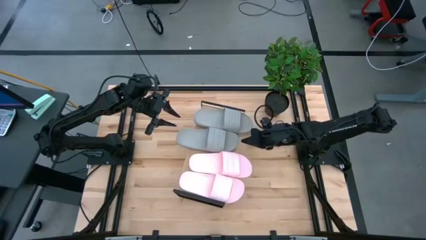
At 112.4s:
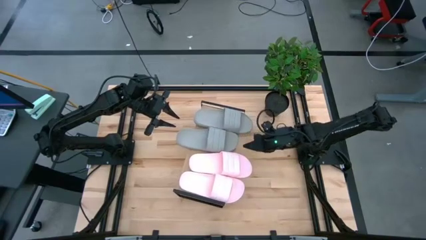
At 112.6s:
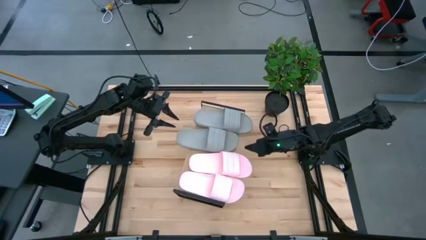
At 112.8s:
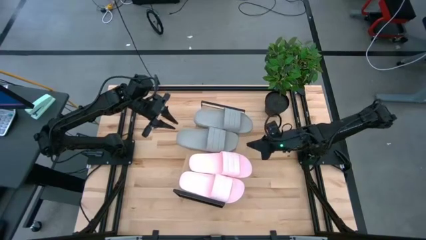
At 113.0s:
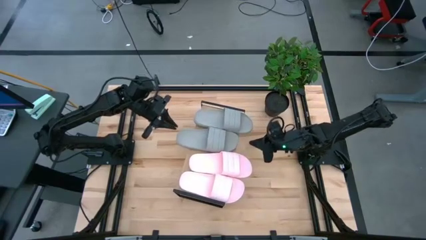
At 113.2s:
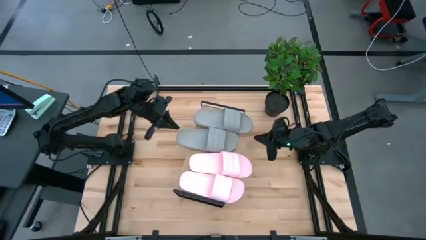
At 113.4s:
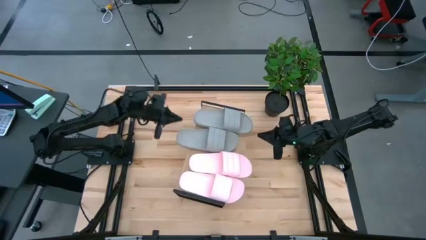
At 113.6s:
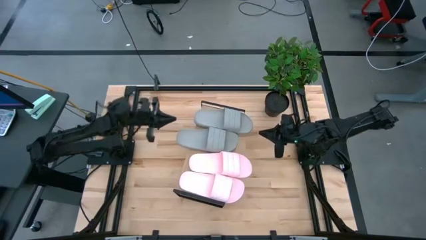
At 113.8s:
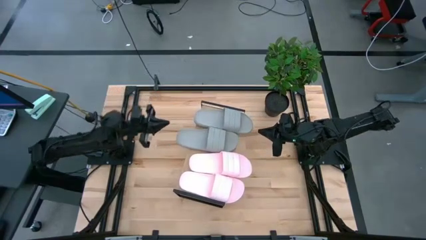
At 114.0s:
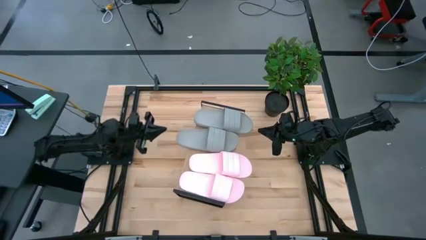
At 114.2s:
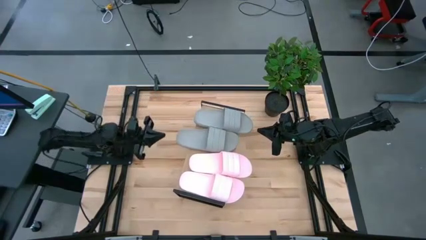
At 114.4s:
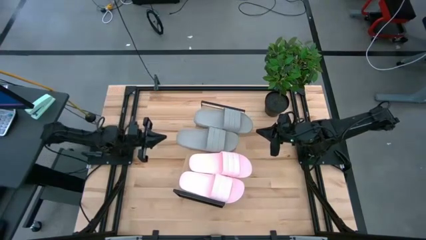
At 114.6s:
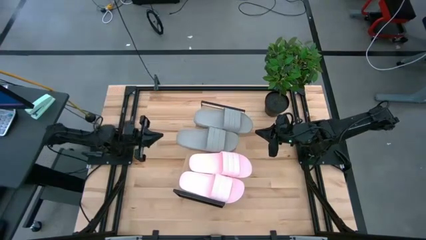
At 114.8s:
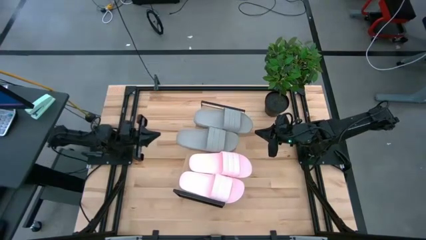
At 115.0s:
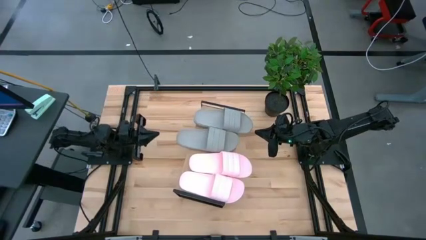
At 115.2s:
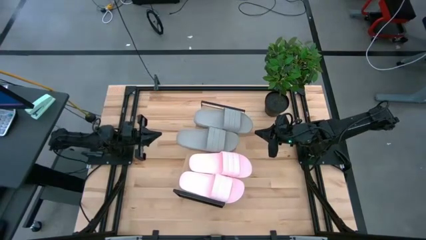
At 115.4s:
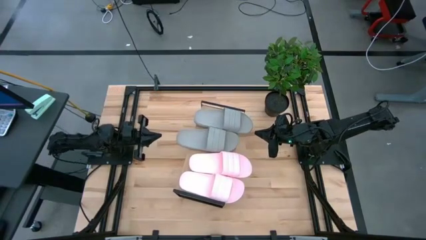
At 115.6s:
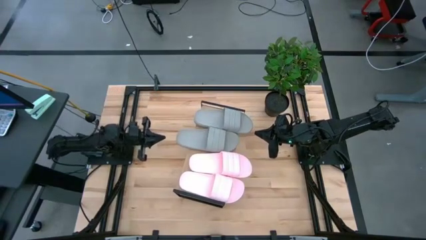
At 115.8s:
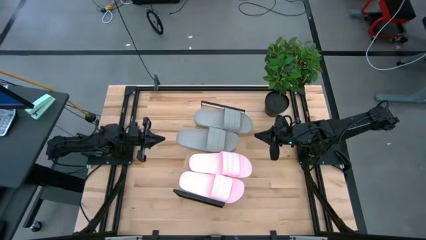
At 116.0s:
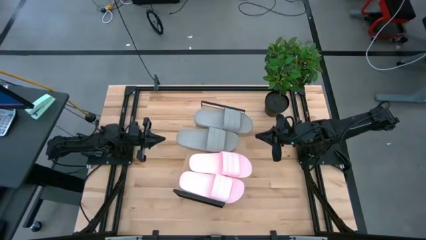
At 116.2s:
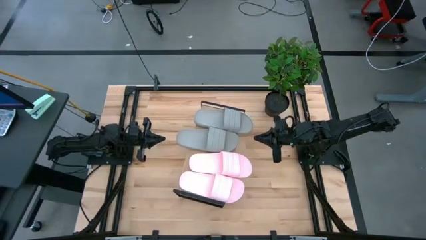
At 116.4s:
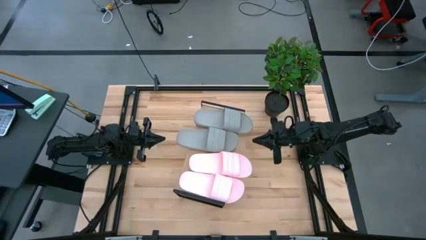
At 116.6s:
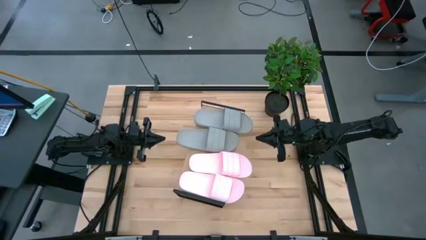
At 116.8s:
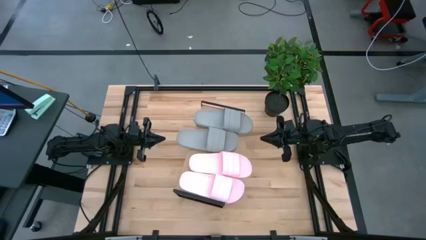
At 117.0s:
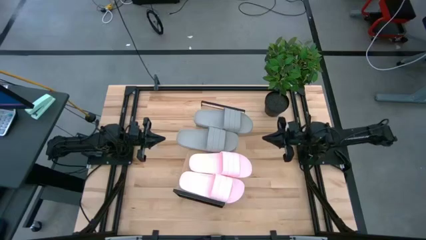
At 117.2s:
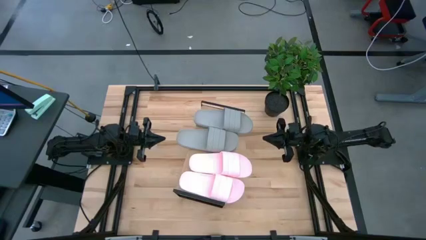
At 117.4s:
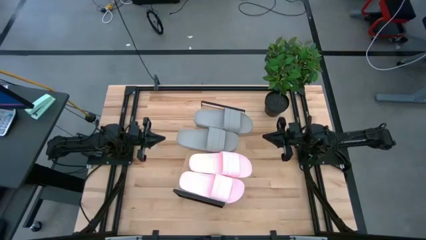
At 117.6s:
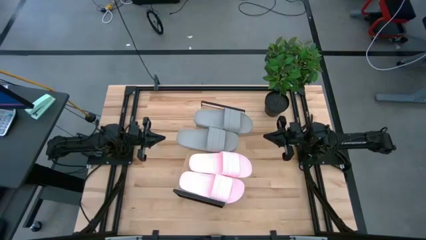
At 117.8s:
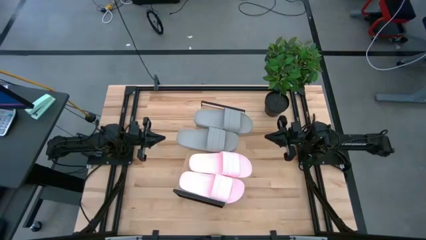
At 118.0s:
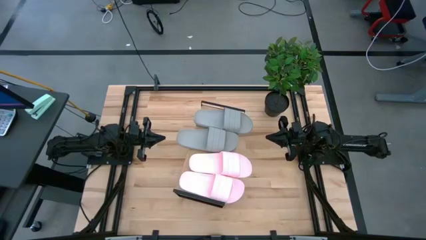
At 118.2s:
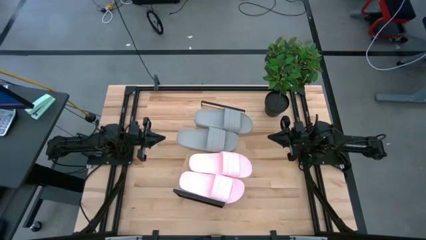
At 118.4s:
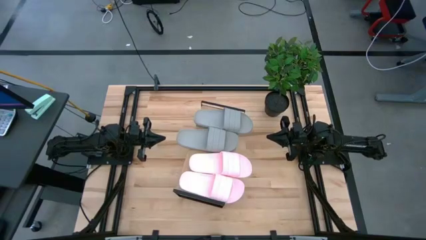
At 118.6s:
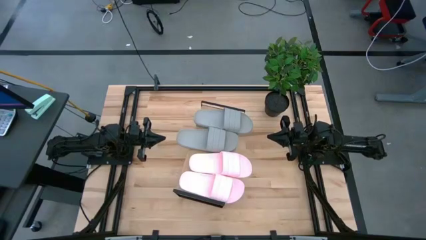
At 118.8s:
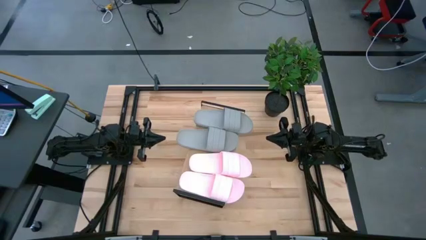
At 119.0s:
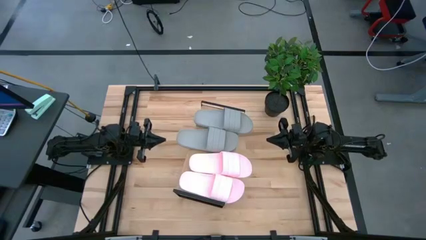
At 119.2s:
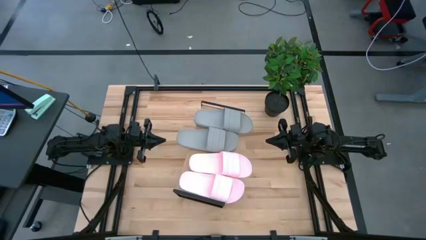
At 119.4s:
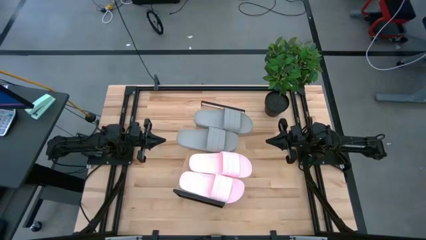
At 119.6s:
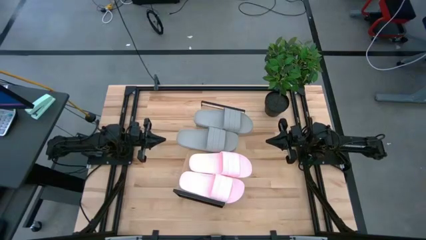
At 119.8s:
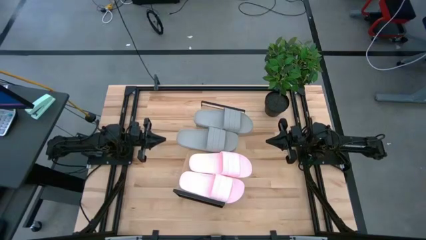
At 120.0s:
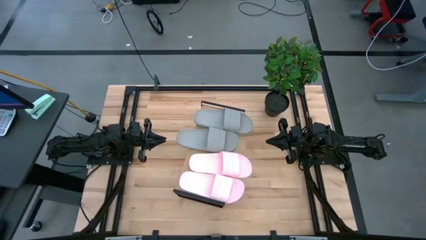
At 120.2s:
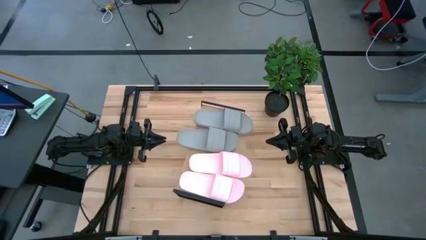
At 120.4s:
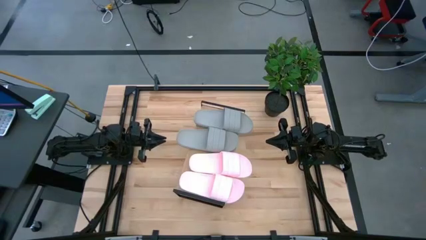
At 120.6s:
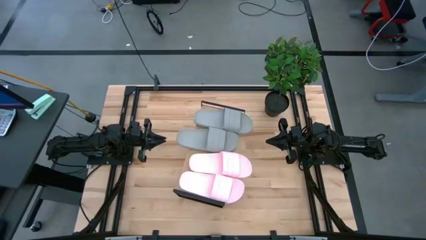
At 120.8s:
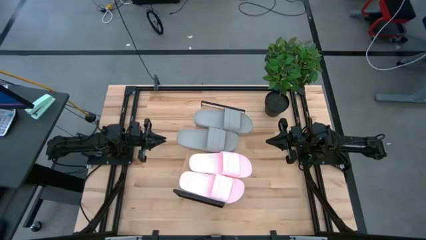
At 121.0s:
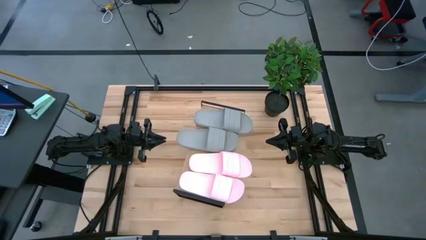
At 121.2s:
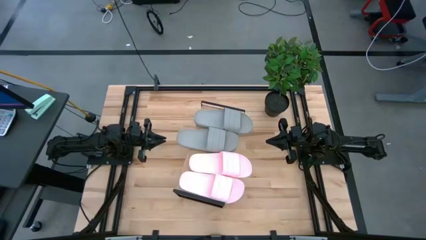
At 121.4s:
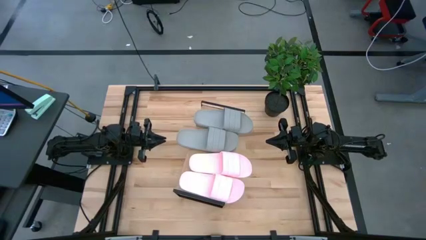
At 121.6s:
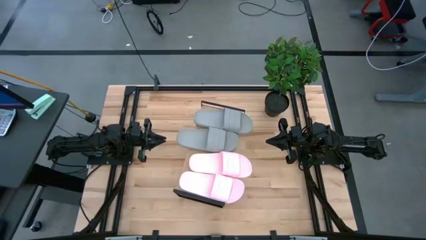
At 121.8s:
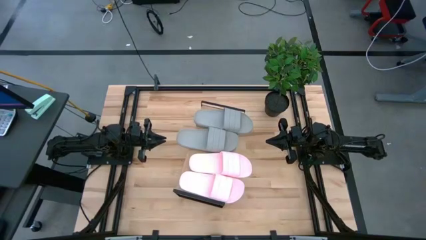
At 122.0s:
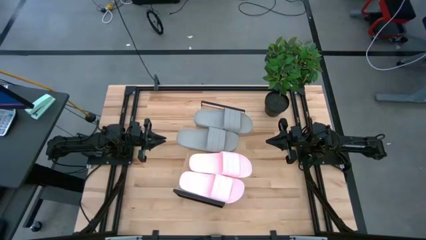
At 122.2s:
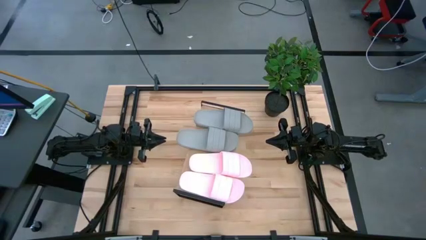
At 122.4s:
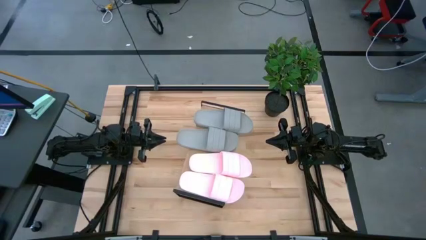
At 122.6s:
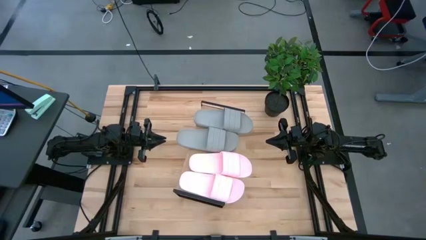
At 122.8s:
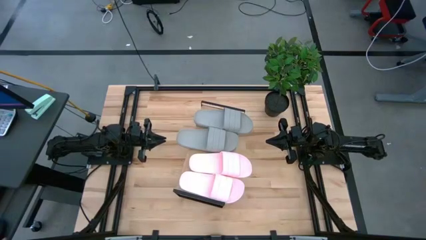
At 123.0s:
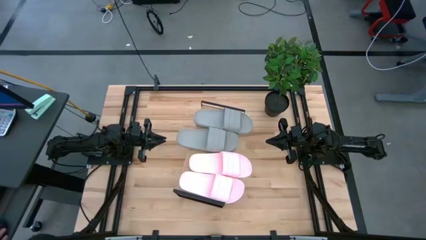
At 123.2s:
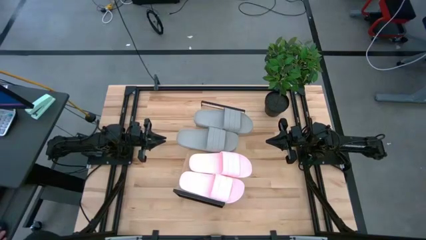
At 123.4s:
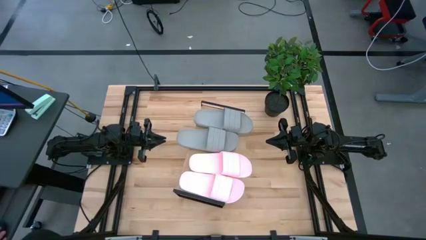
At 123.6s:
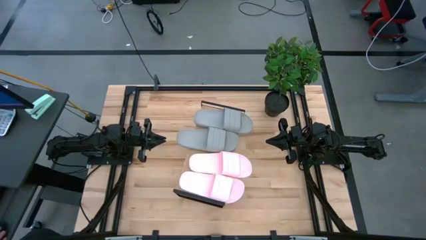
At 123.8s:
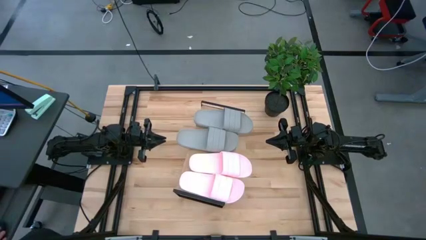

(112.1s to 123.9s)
Task: Pick and place slides into the shelf
Return to Home Position

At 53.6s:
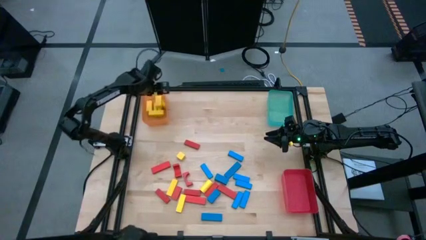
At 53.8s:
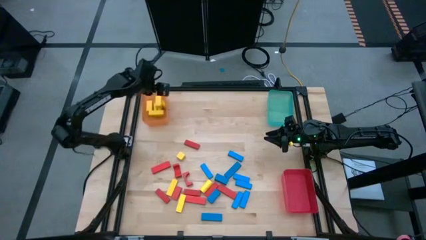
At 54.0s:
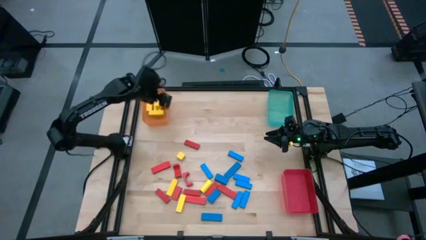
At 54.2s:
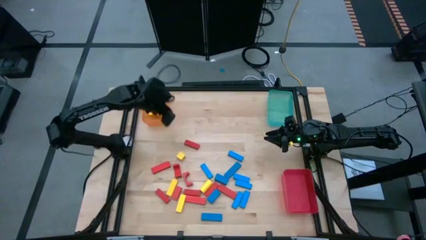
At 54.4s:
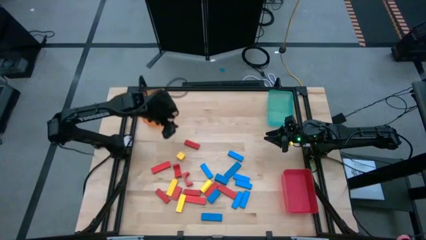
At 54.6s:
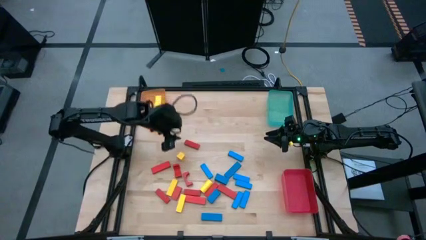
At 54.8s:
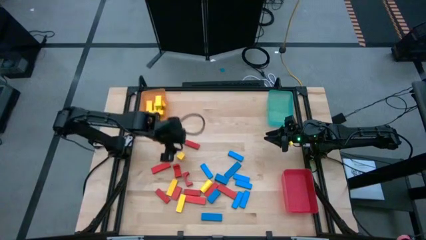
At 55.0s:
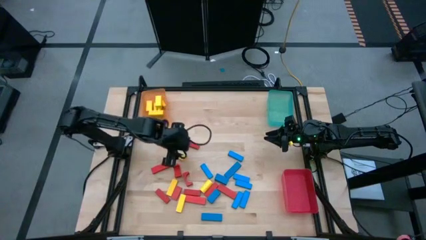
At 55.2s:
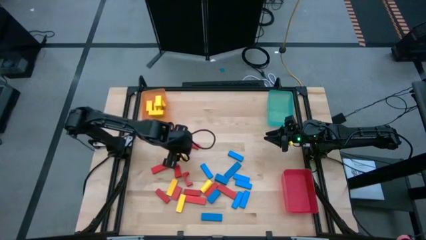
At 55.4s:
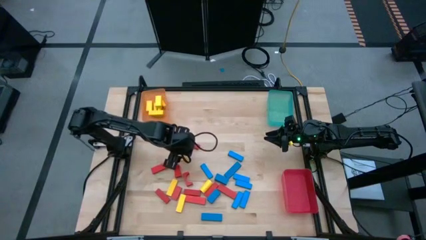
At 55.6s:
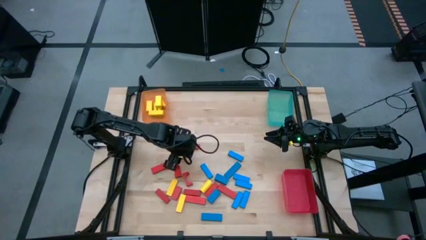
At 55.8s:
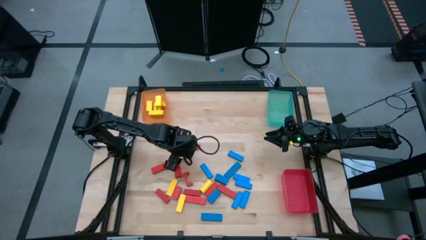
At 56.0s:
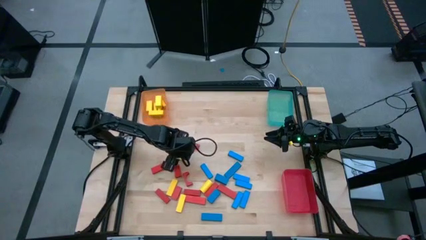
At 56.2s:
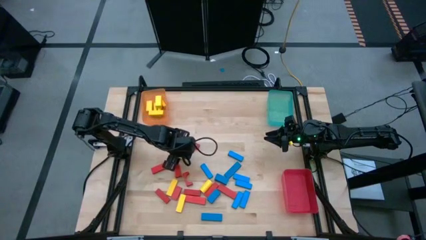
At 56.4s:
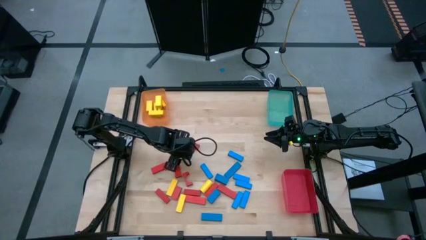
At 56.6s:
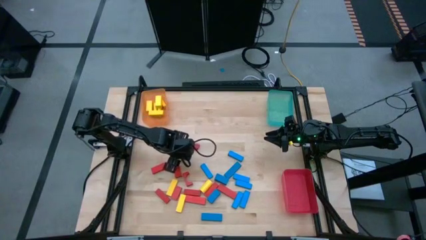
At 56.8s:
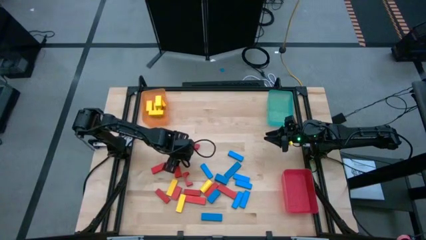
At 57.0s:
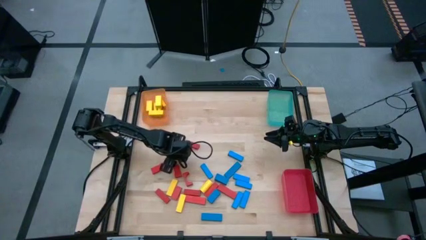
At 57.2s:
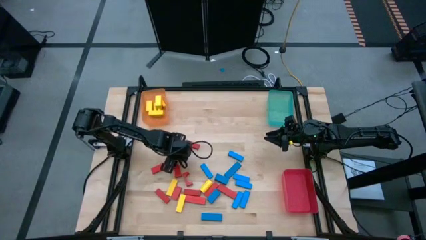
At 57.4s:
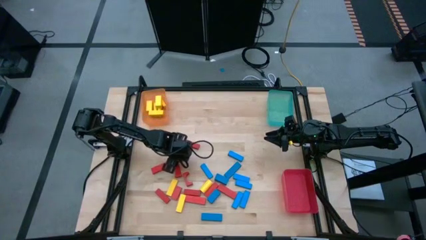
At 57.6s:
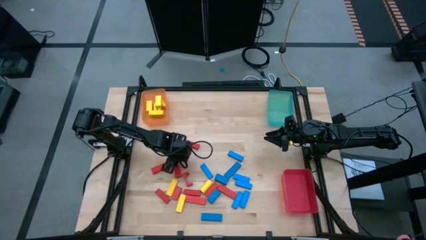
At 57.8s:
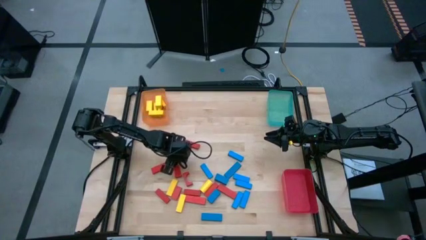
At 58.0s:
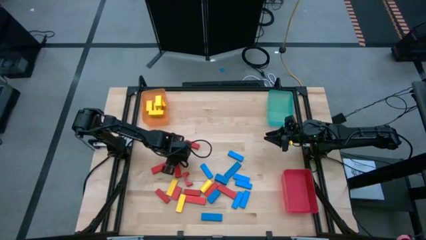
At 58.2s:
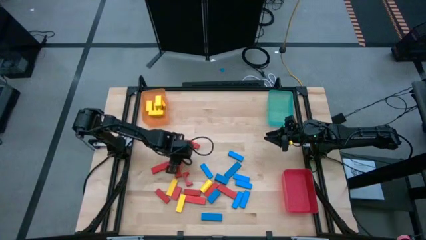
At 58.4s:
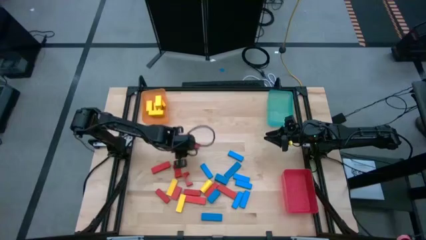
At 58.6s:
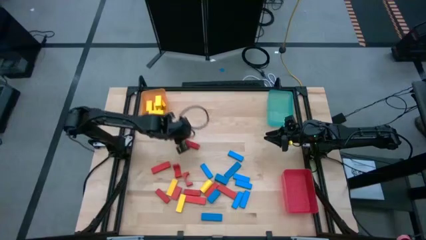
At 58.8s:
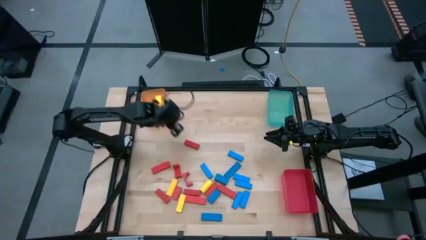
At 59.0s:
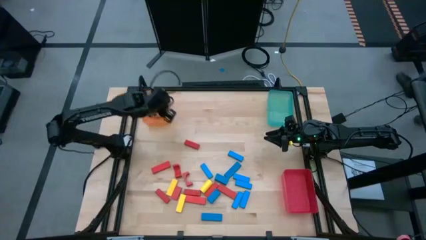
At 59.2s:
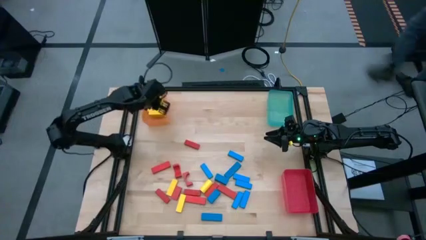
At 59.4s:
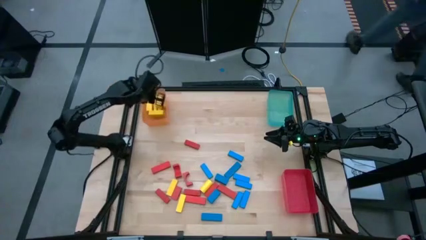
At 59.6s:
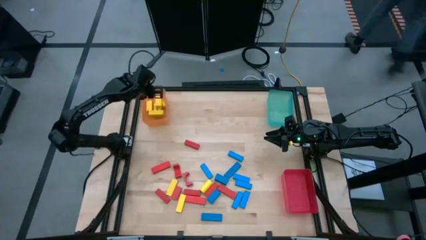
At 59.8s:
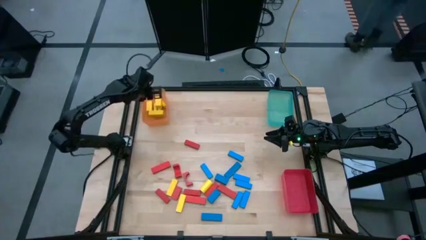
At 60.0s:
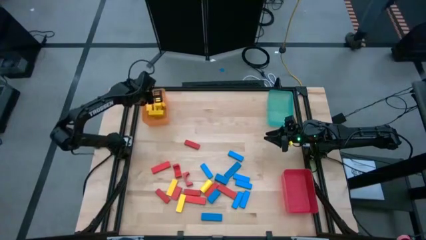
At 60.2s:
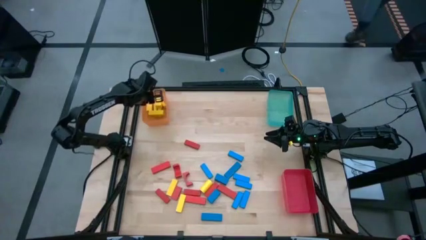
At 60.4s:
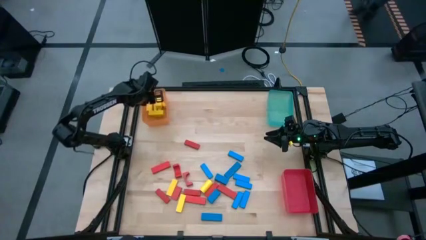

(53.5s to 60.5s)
Task: Sort blocks
Put the yellow block into the orange bin
